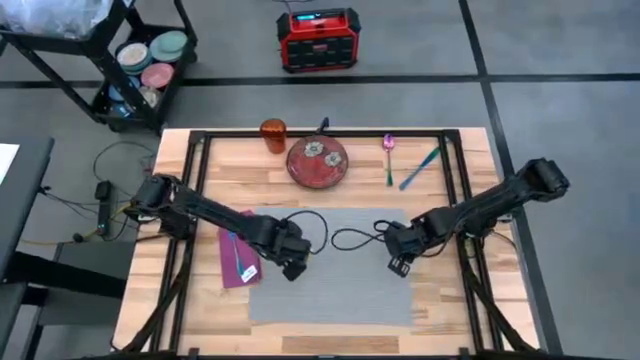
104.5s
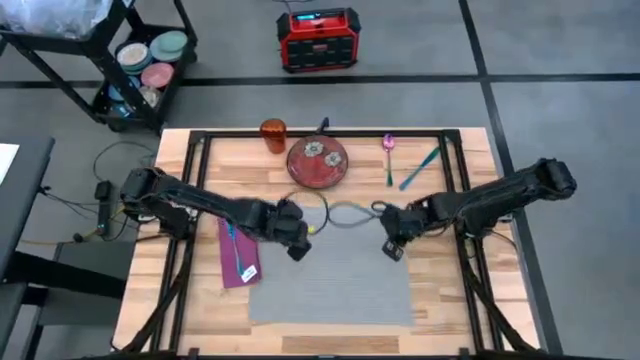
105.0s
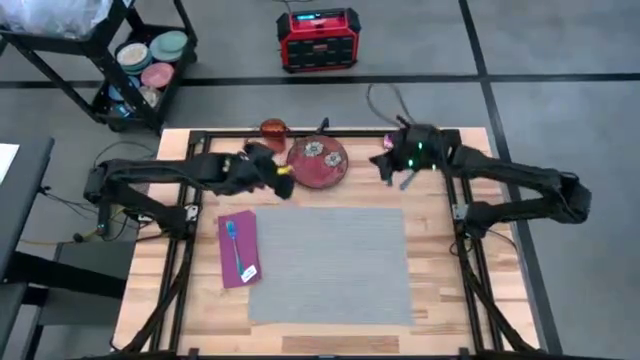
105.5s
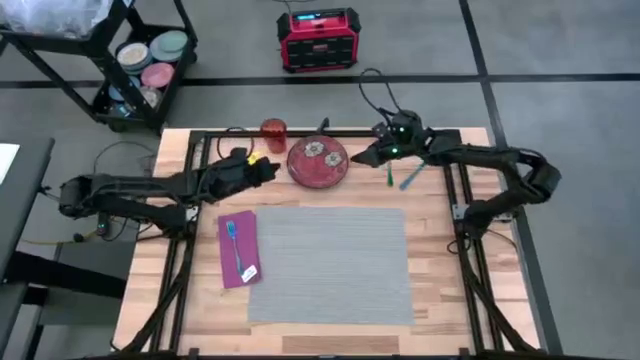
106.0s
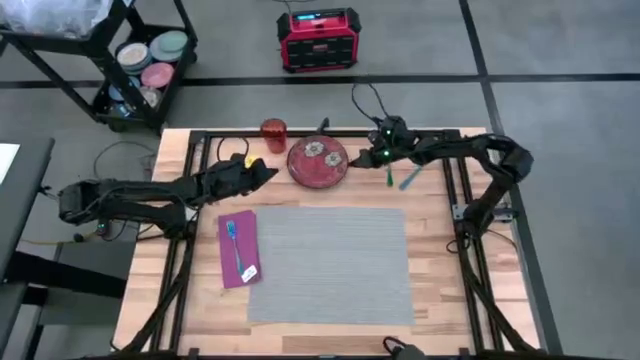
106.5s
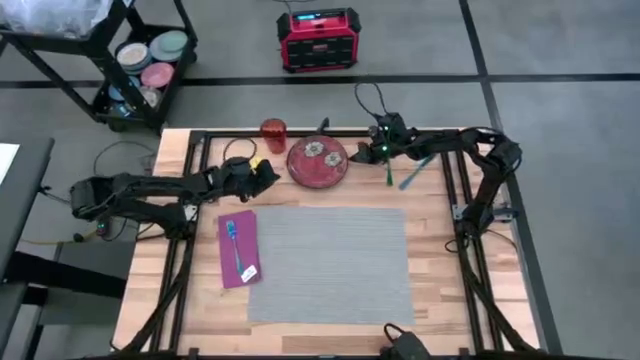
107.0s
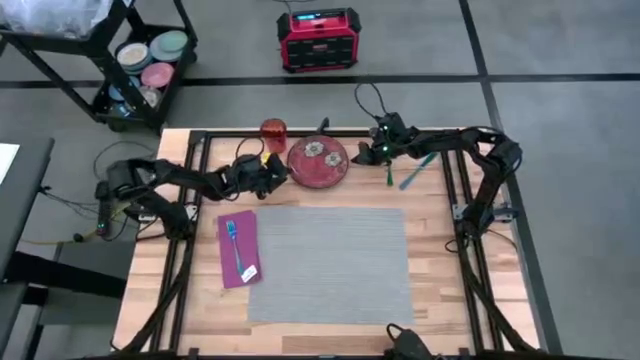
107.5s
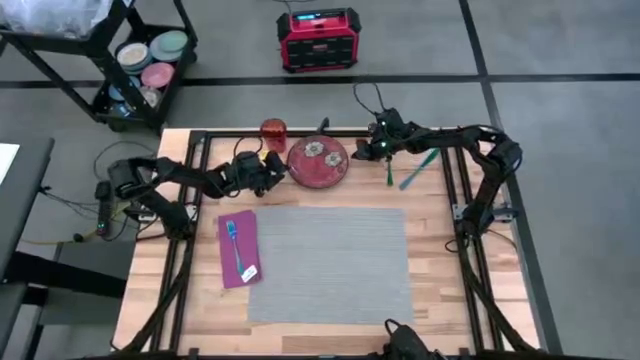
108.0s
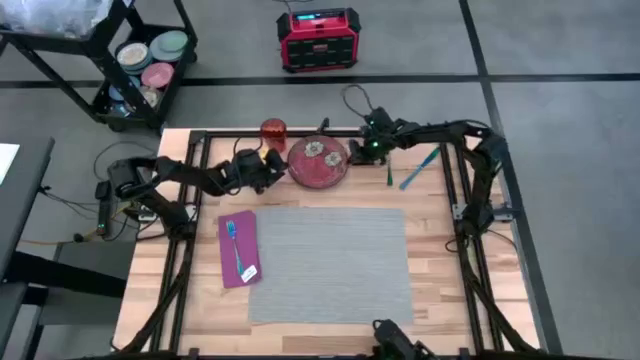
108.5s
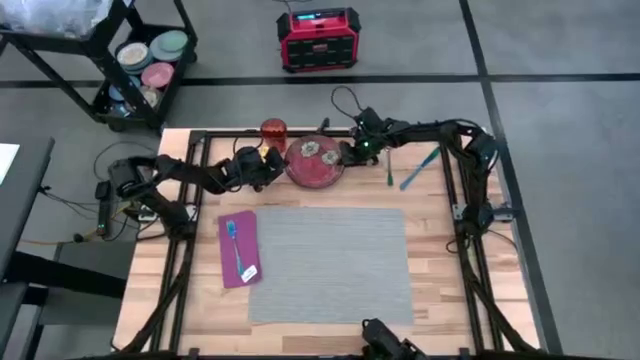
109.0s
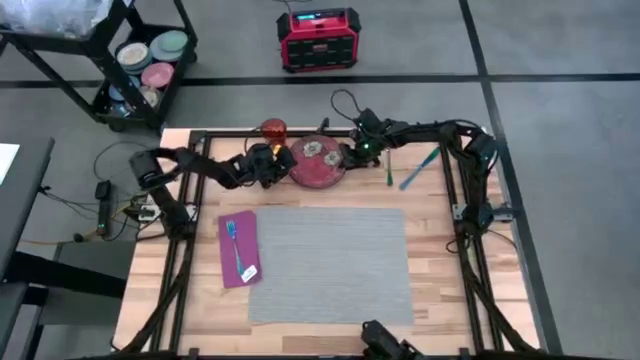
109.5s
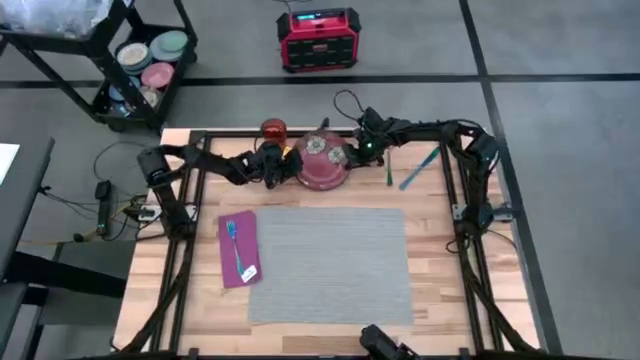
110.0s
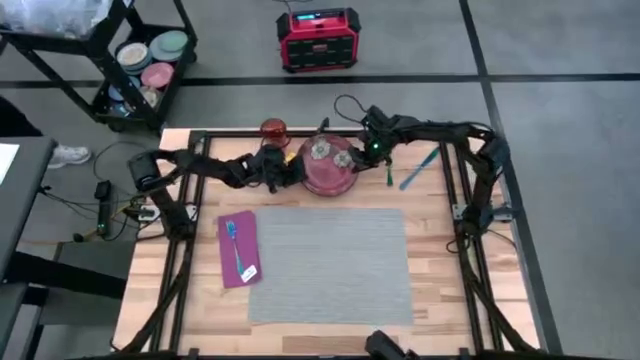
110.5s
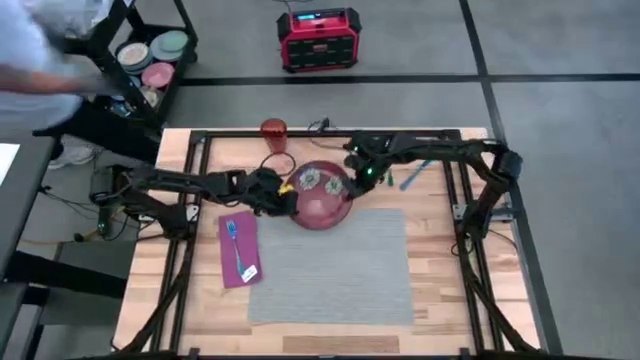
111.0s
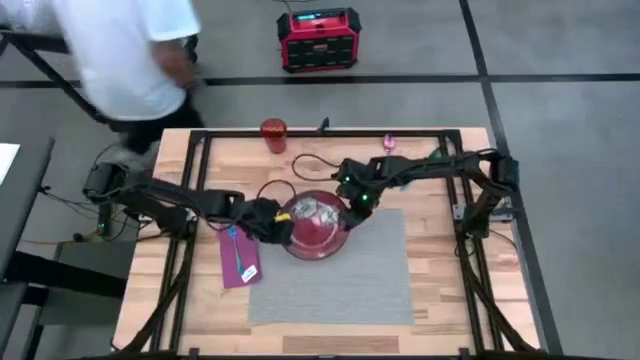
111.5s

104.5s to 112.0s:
Task: Set table place
Put the red plate on the left of the gray placemat

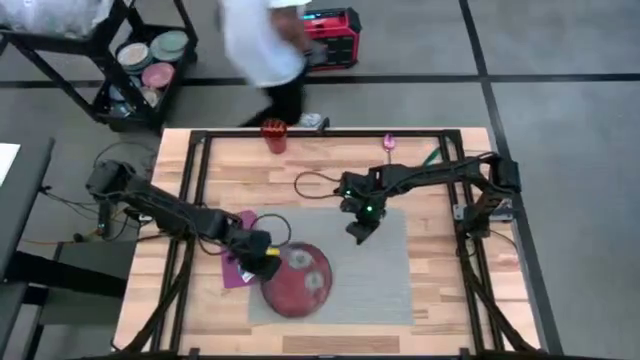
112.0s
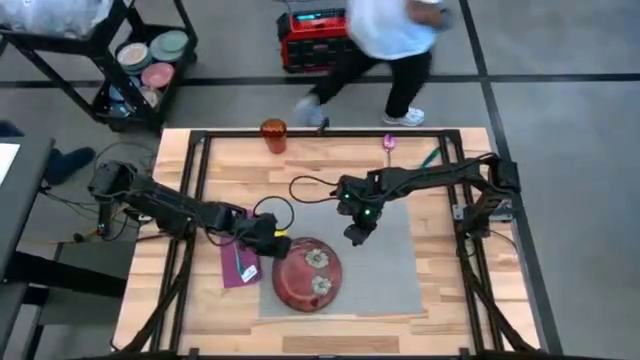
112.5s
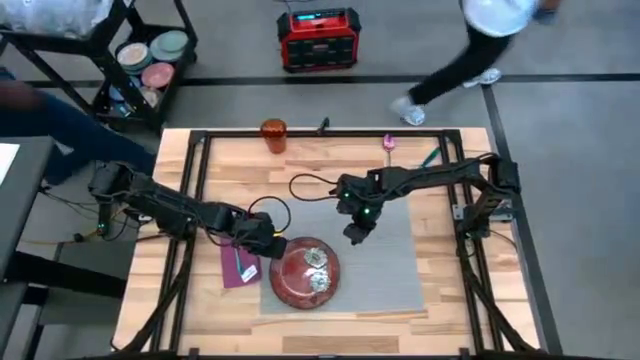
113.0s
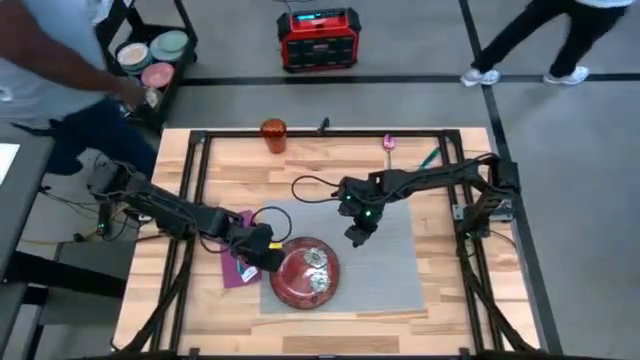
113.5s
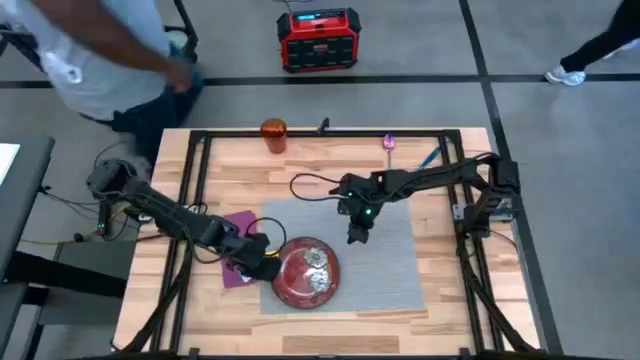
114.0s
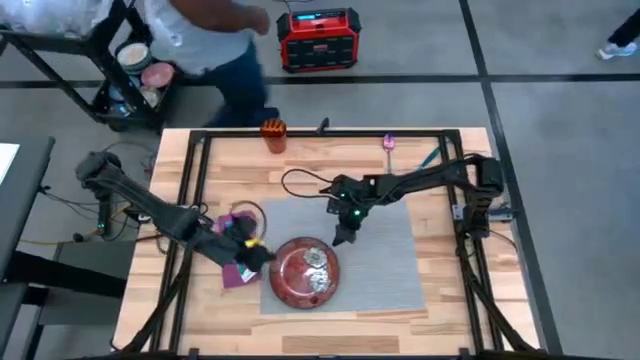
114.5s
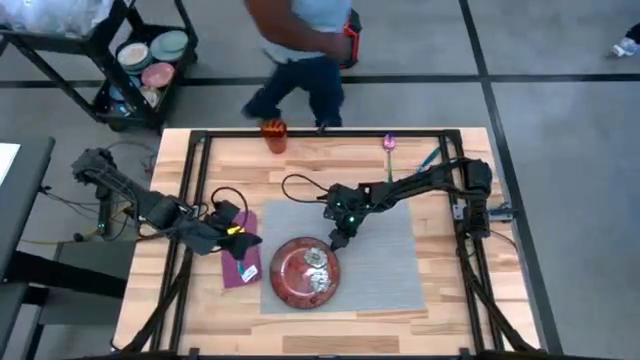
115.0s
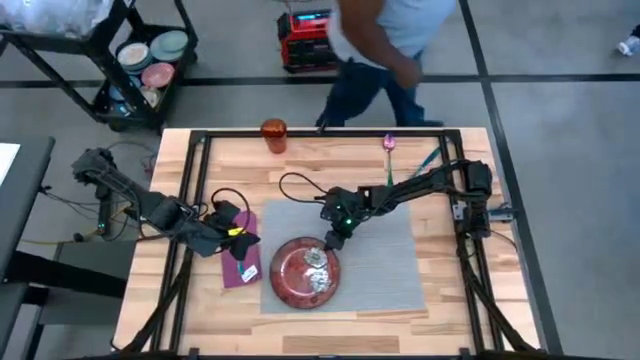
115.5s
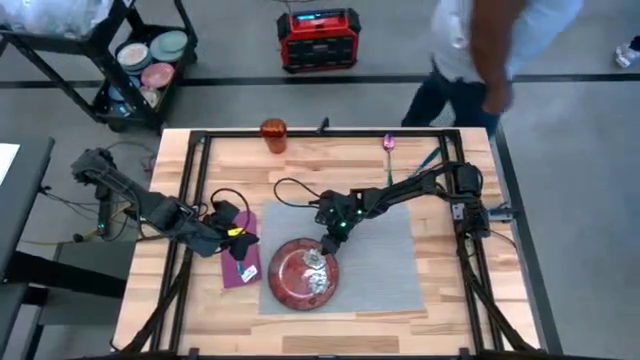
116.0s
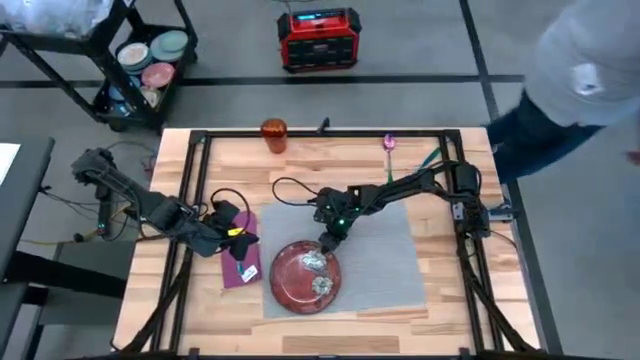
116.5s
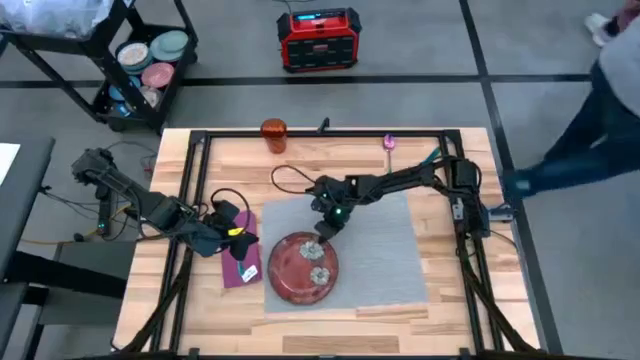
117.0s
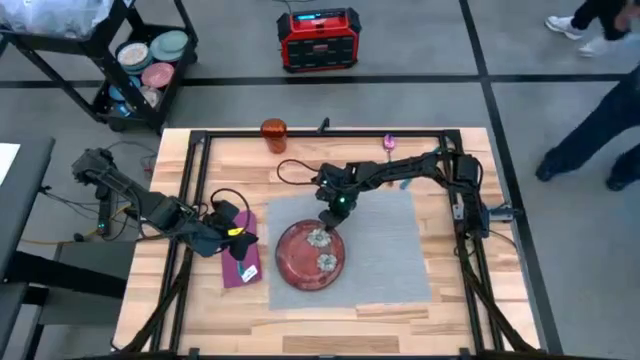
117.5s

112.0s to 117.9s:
Put the red plate on the left of the gray placemat

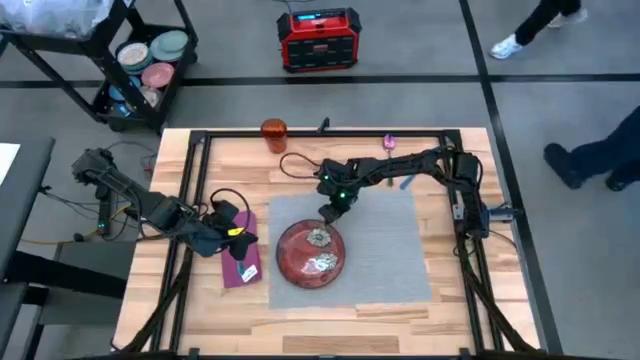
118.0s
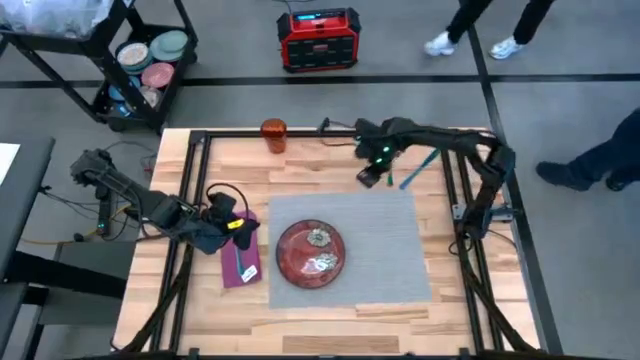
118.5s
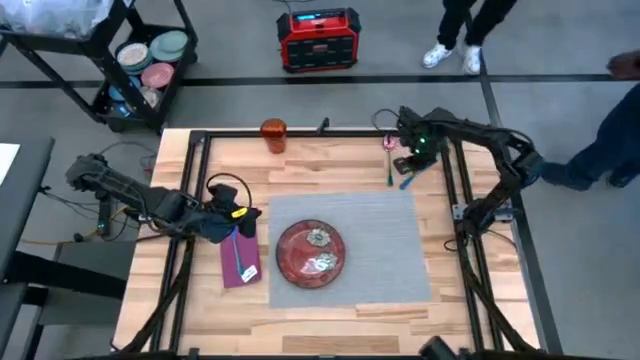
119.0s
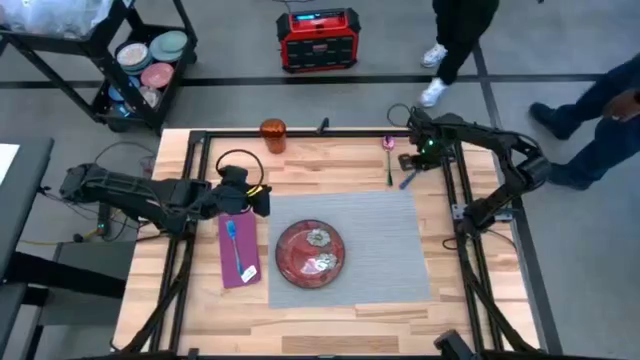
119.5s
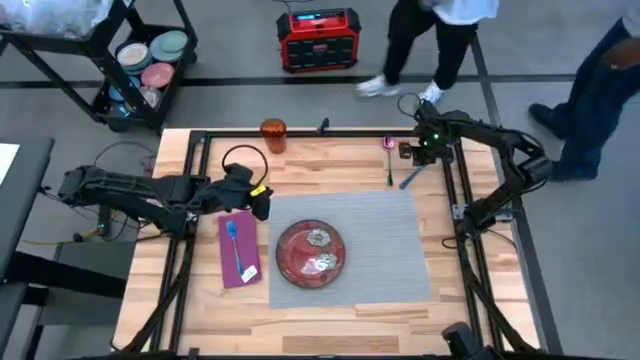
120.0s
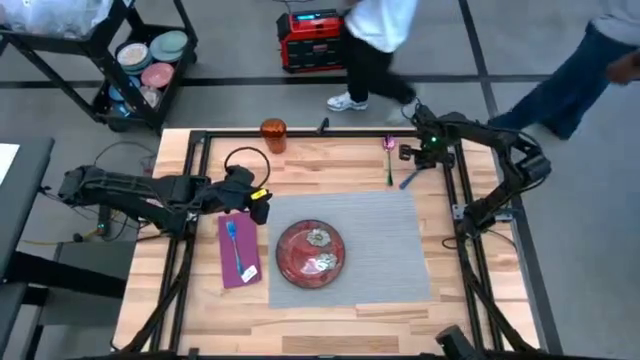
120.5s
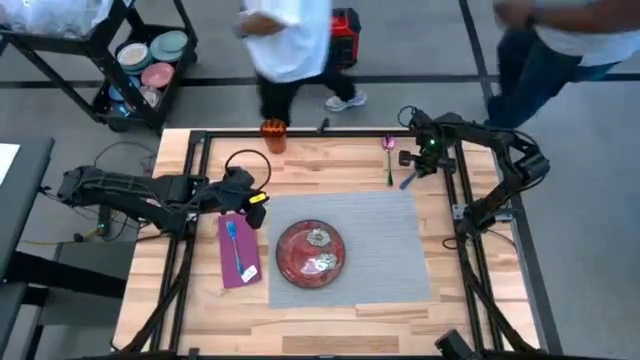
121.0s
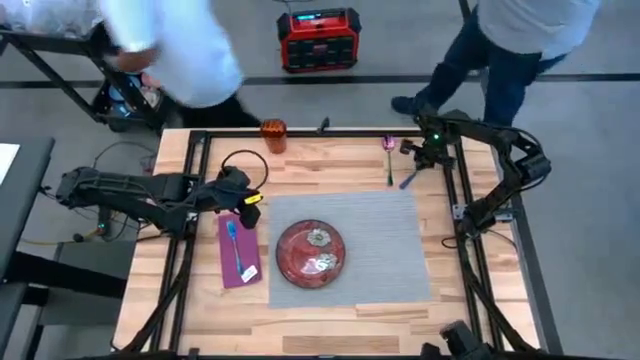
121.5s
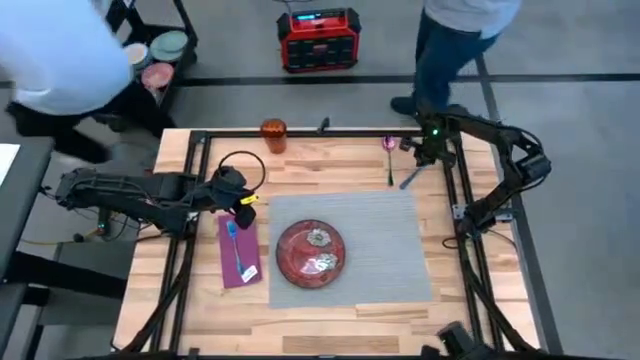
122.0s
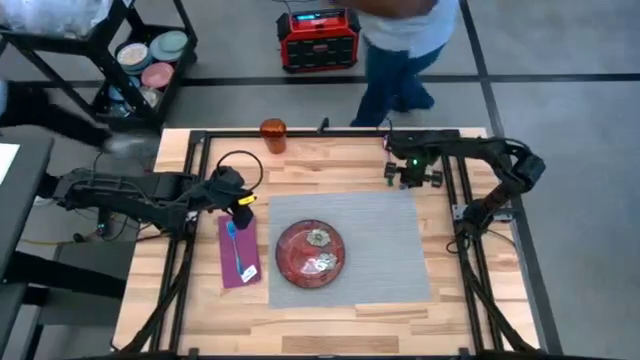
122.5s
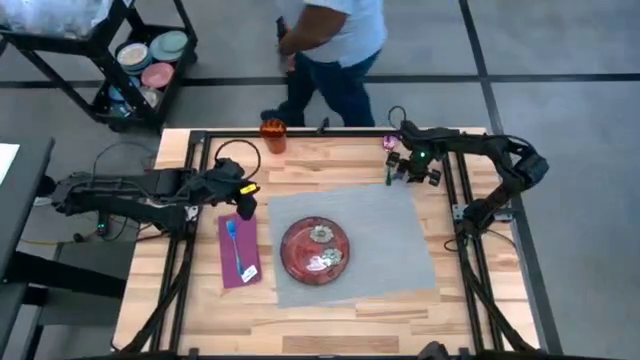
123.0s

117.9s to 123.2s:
Adjust the gray placemat

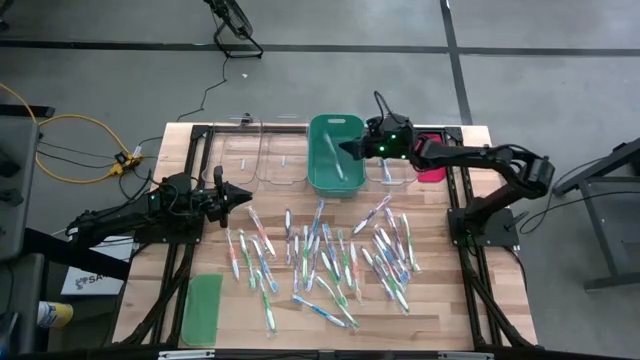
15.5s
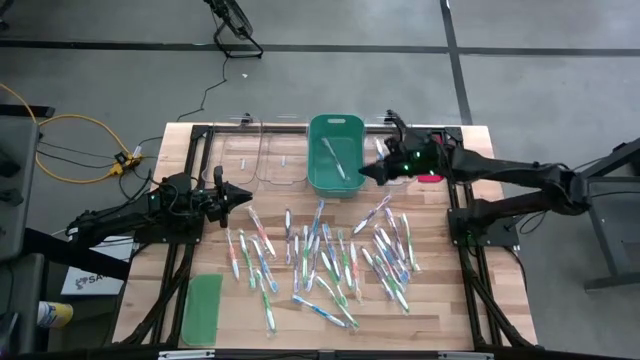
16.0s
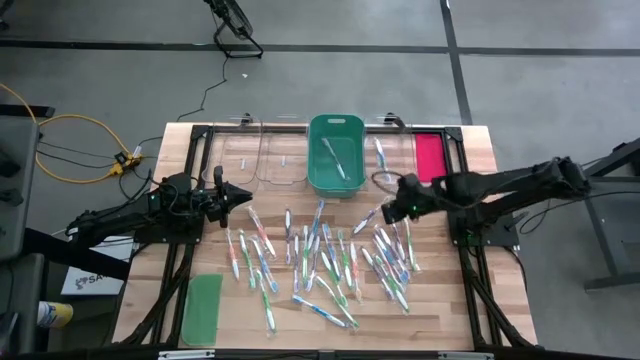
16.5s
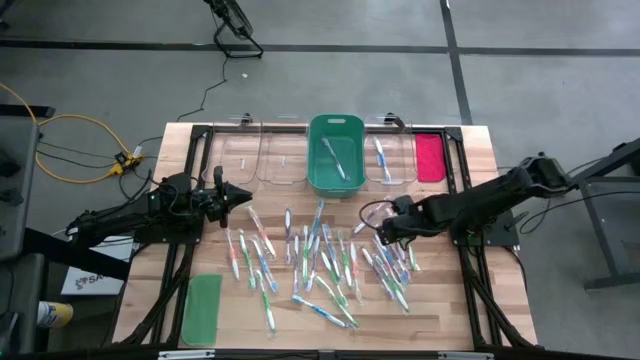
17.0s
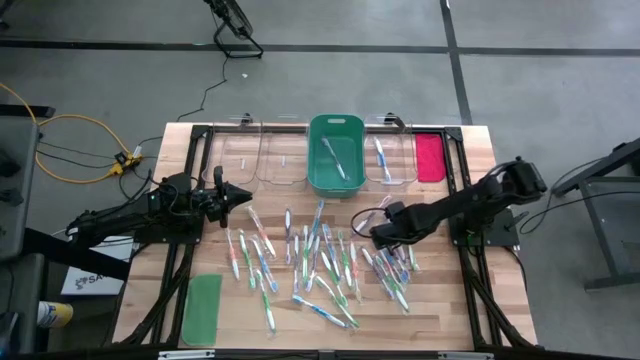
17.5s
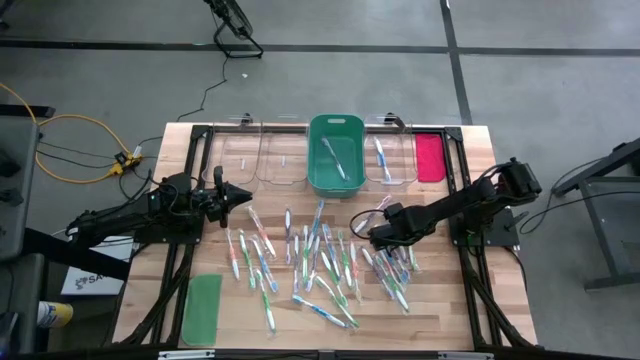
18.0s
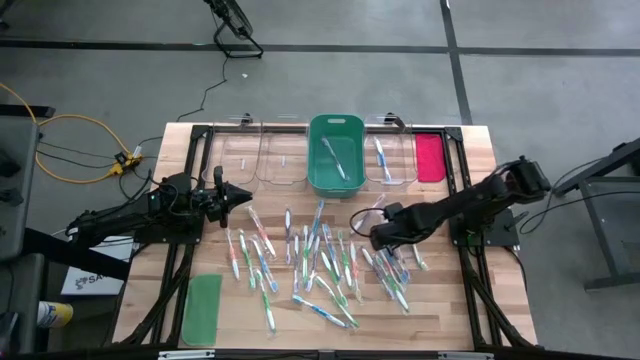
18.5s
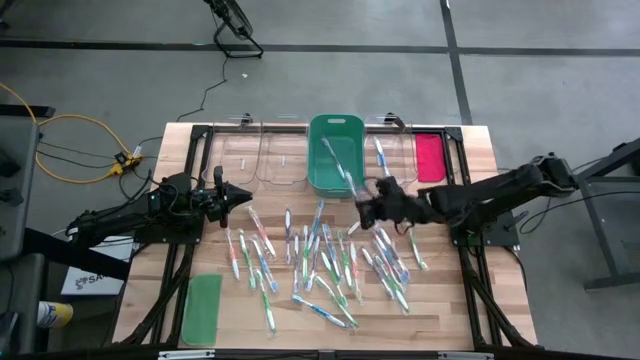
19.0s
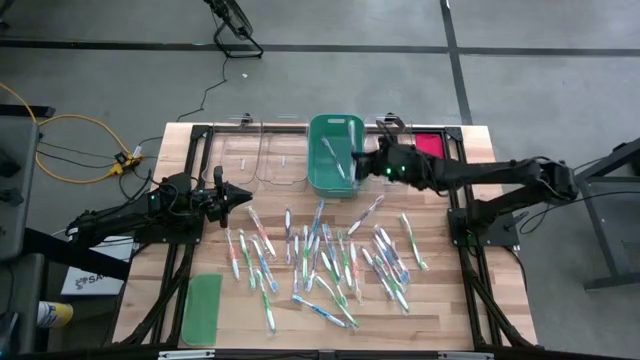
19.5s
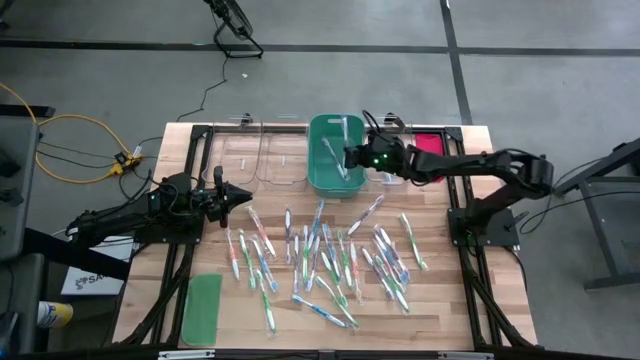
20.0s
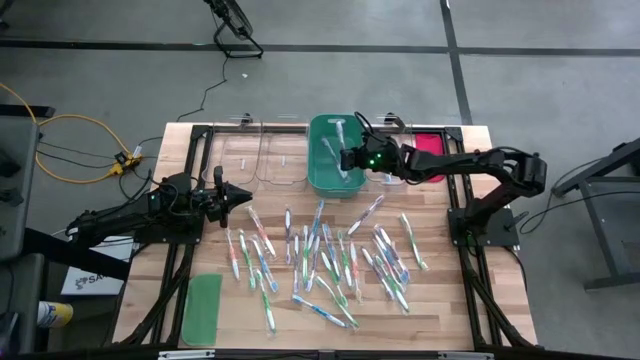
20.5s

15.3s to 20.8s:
Task: Pick & Place Toothbrushes
Put the purple toothbrush into the green bin
